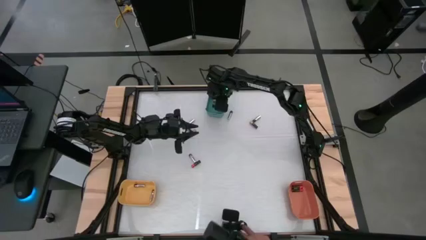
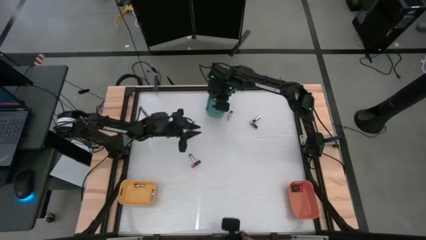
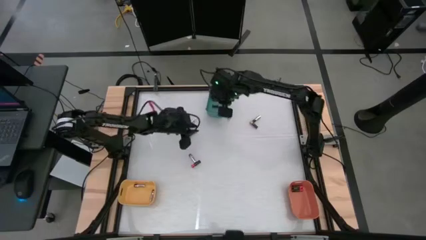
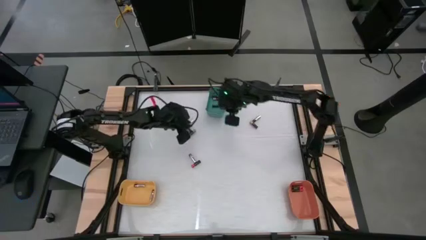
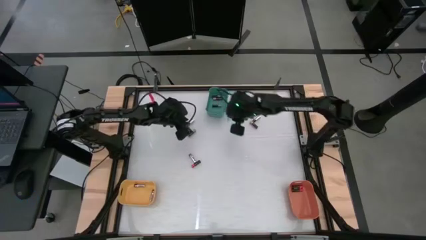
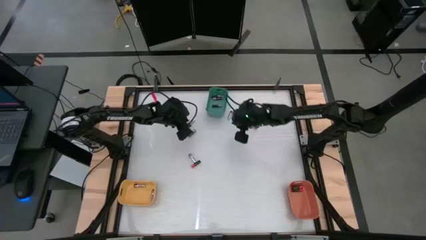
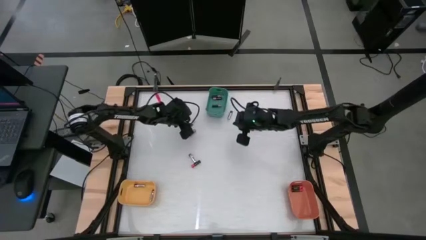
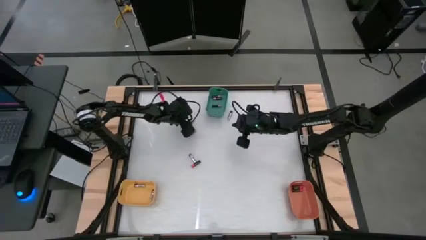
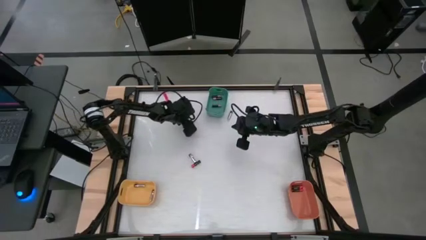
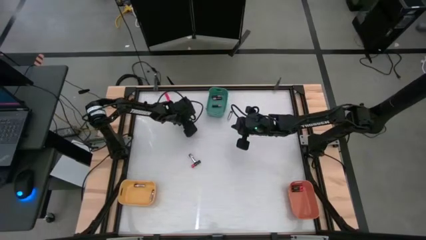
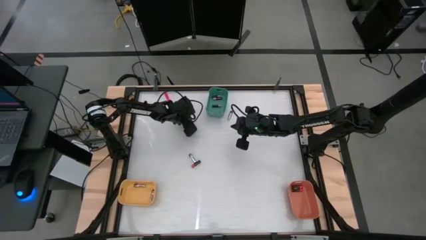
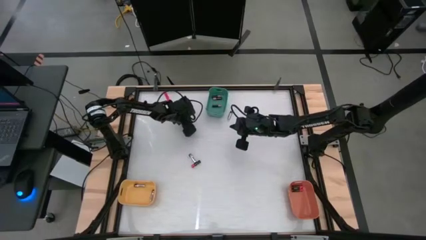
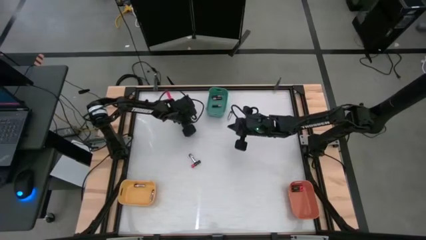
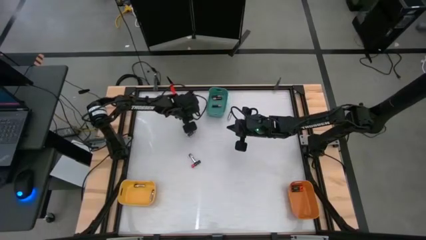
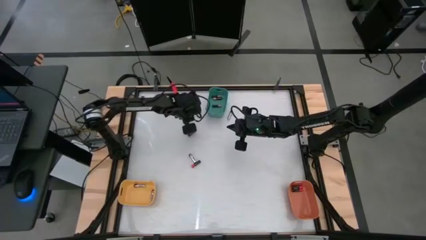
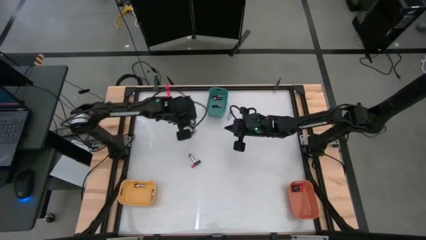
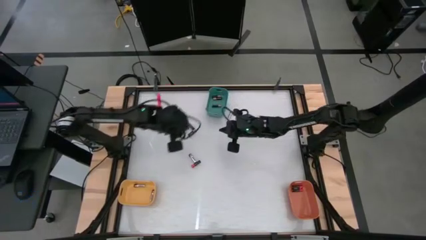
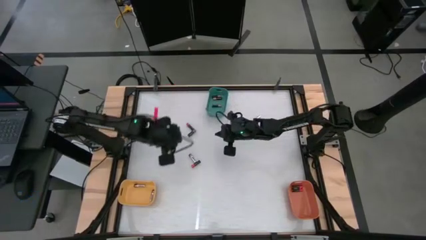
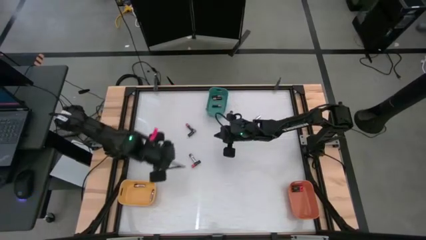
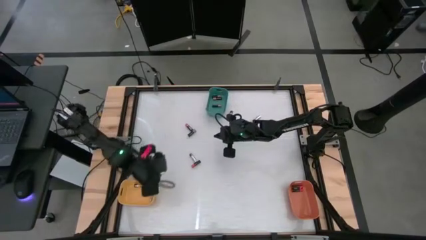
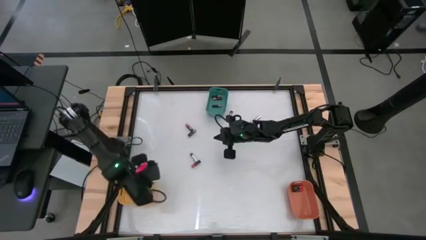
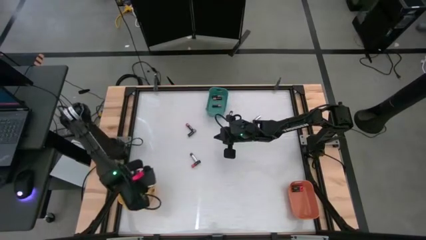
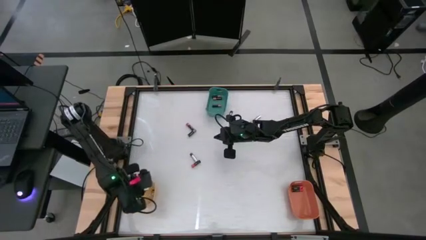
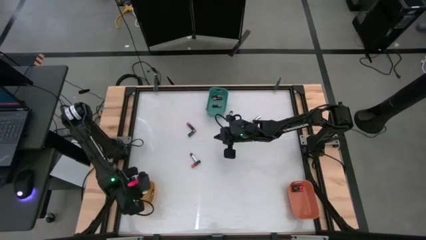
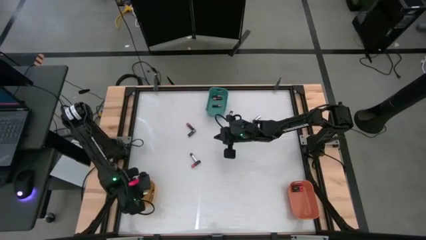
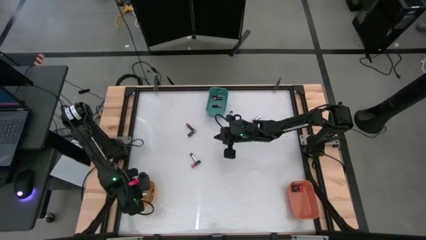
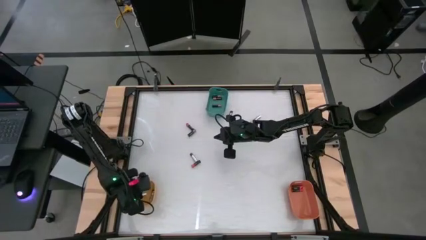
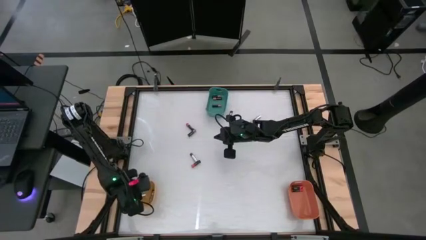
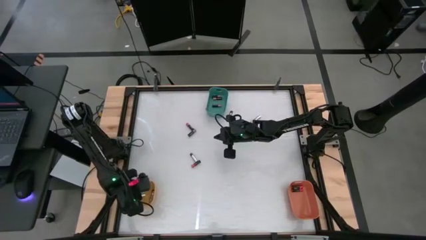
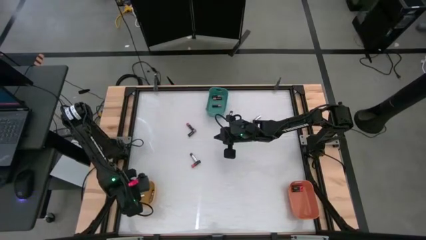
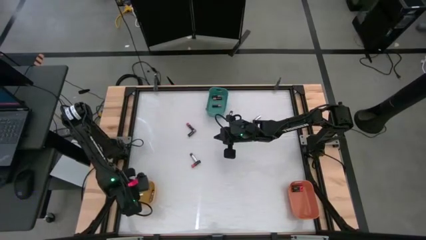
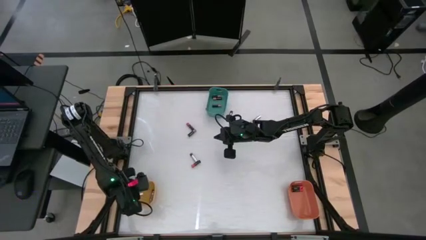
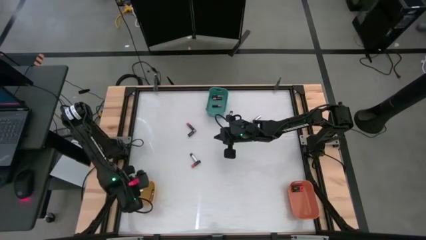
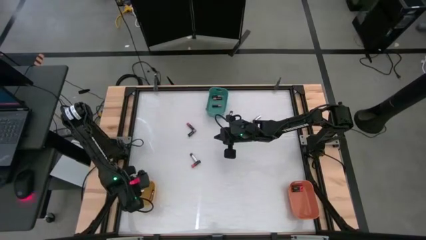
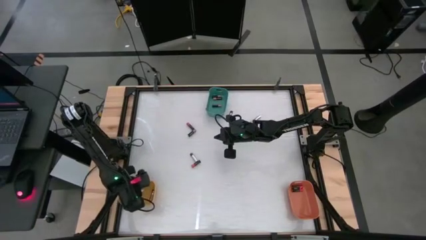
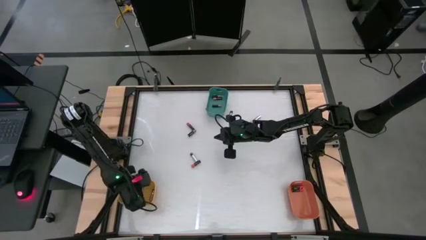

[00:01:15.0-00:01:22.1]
Task: Sort batteries
Put the silver battery into the yellow bin

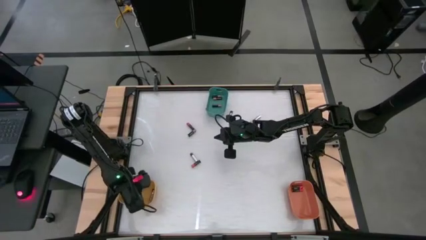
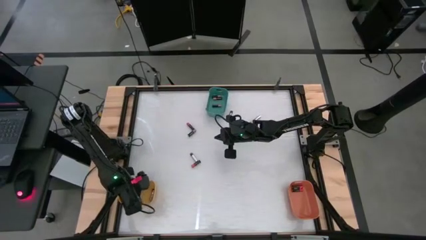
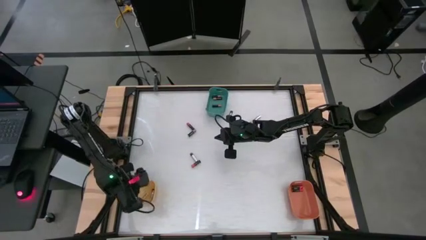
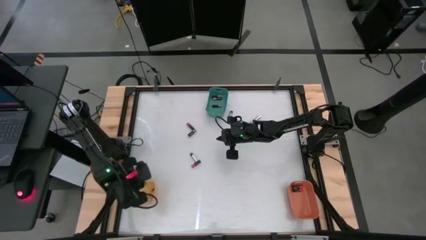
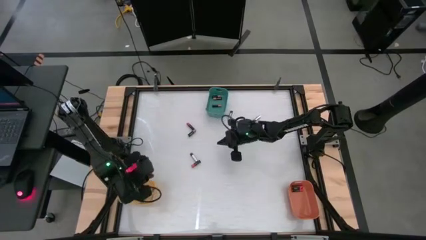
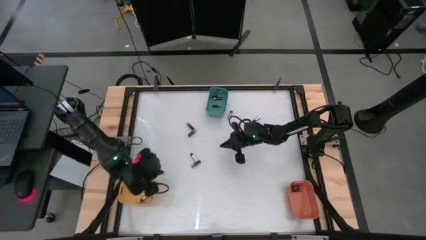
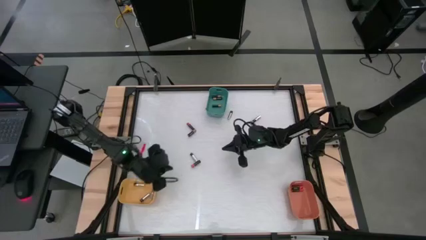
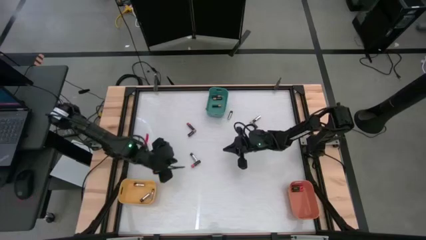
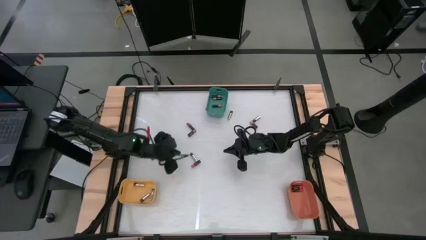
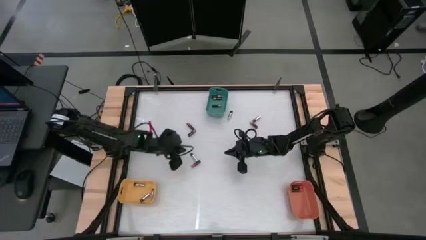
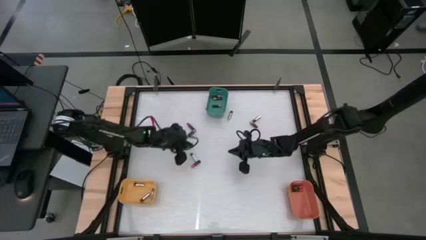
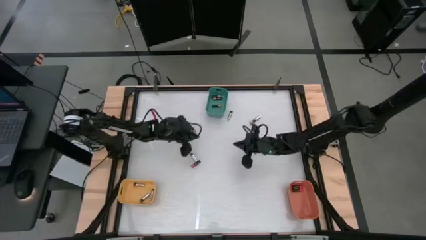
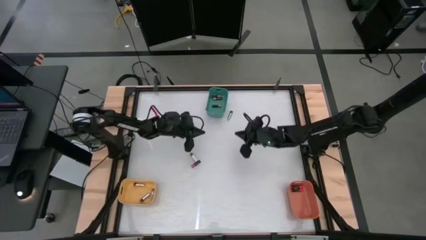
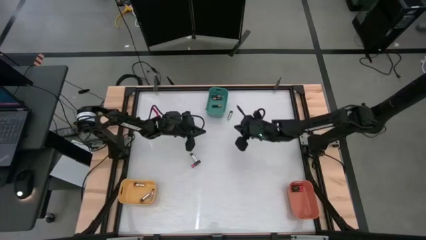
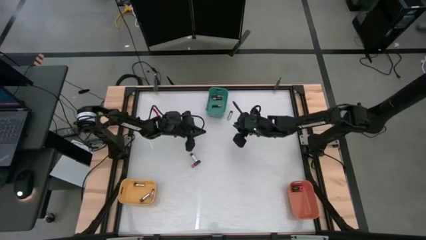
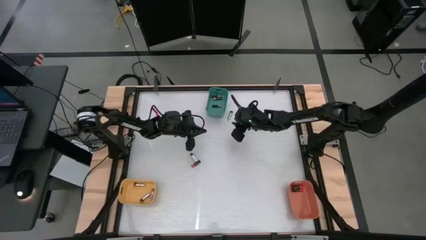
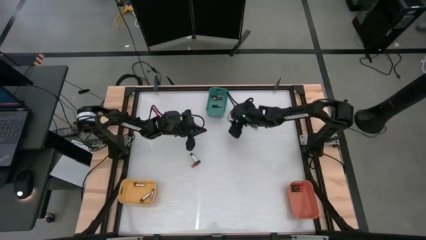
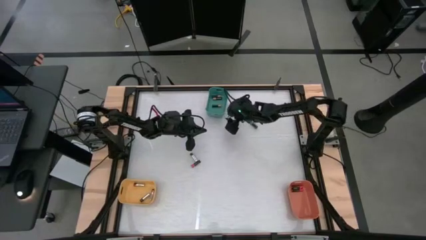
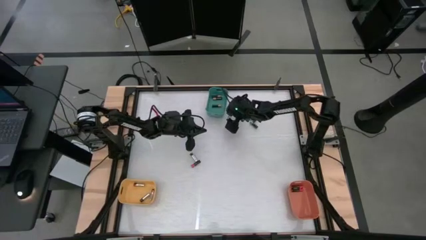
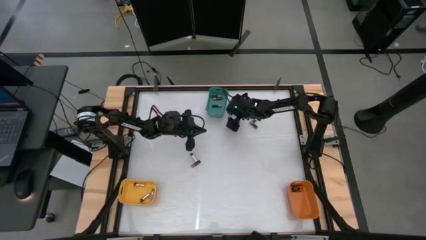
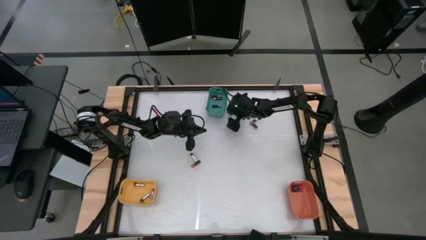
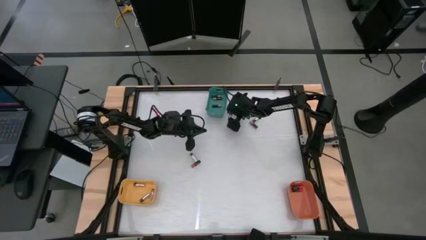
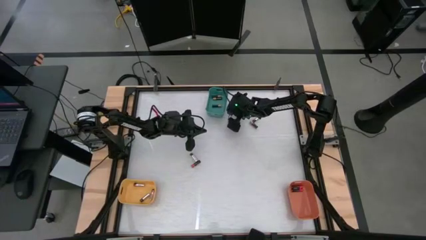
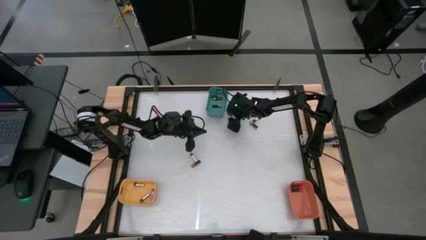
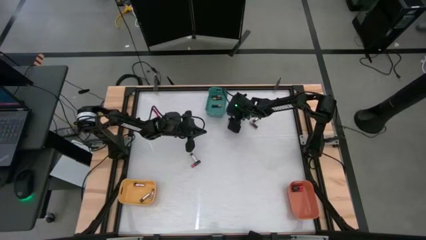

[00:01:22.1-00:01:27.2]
Put the silver battery into the yellow bin
